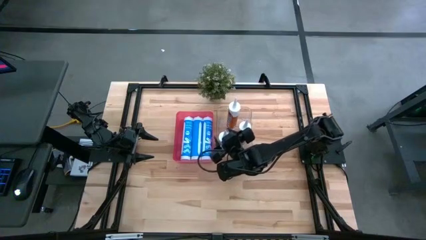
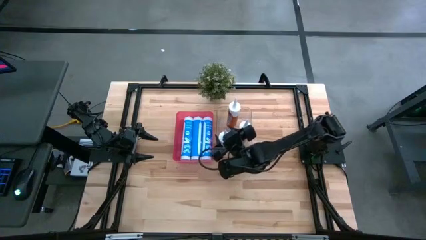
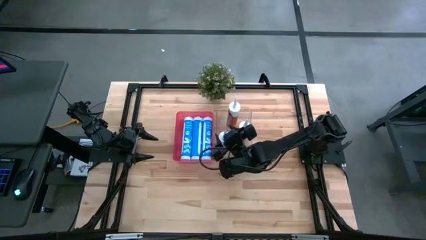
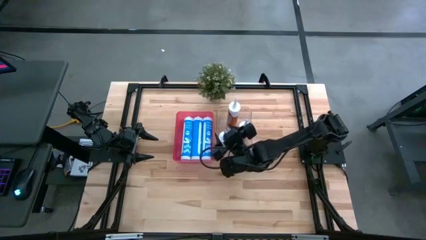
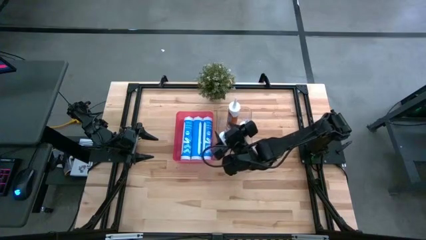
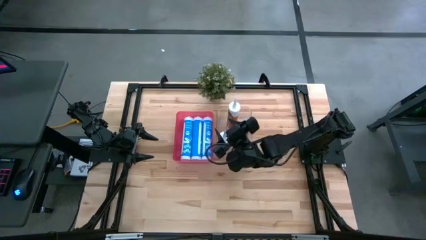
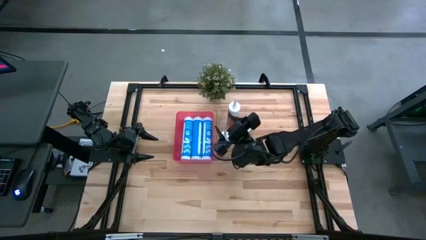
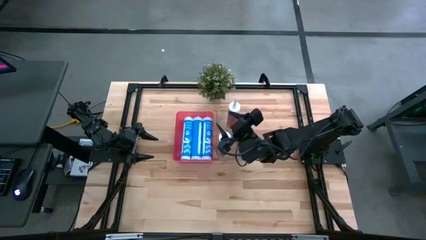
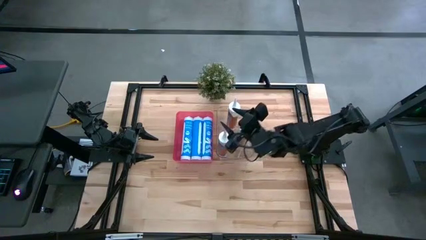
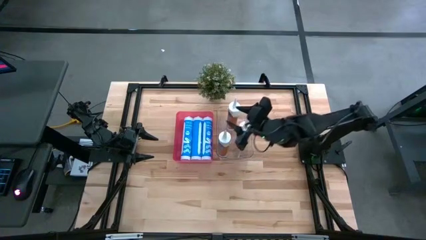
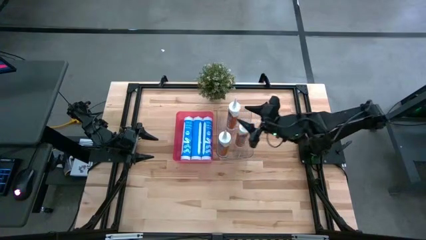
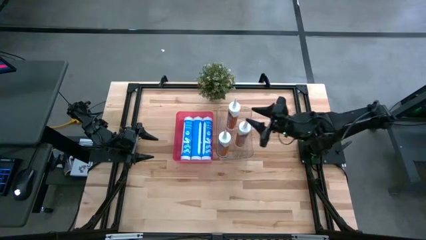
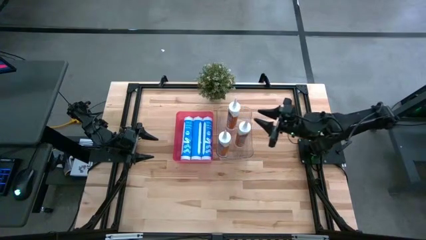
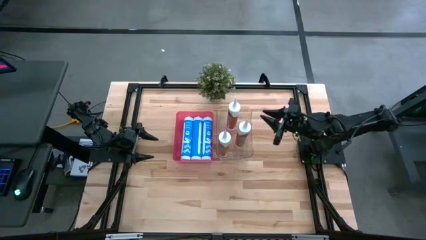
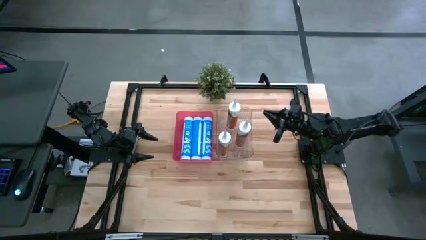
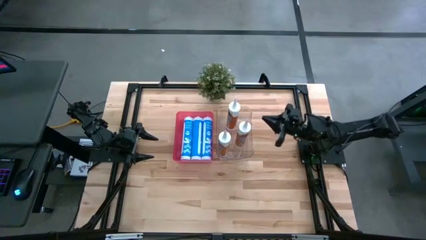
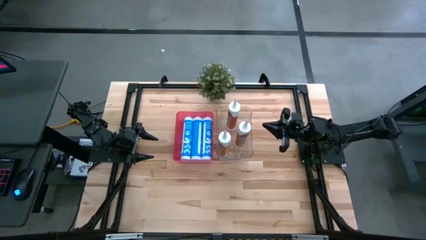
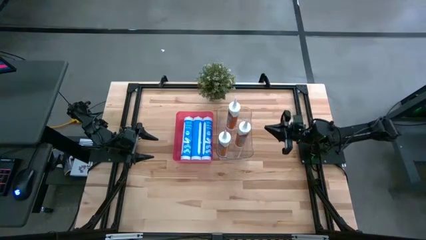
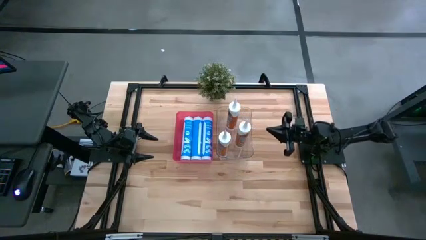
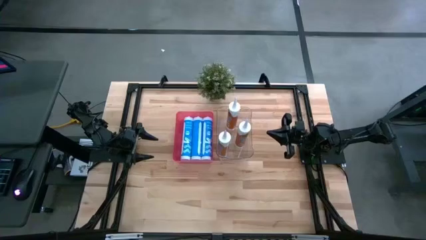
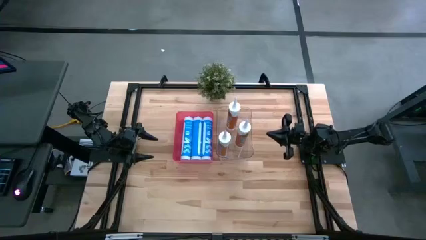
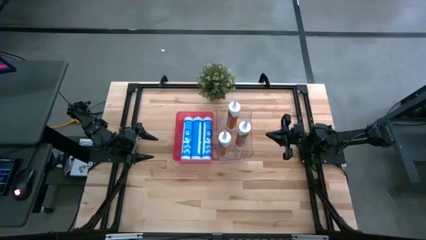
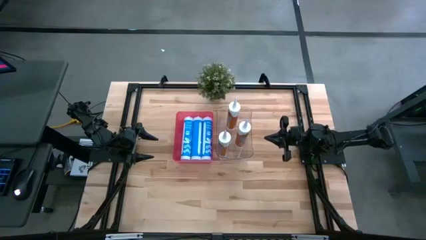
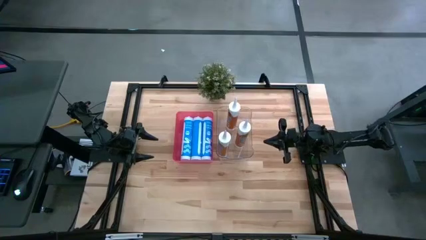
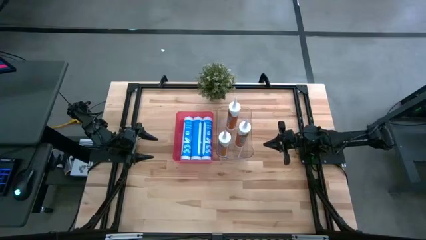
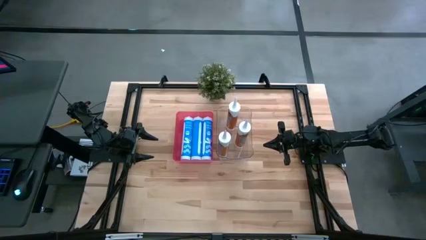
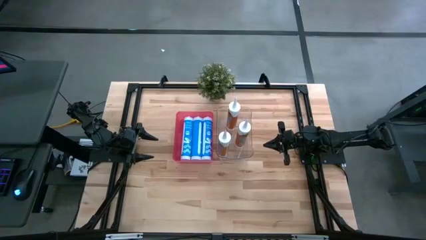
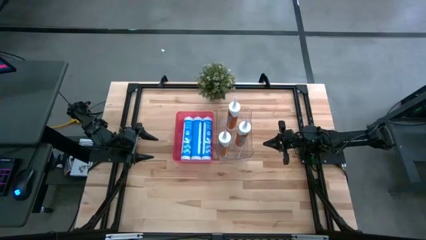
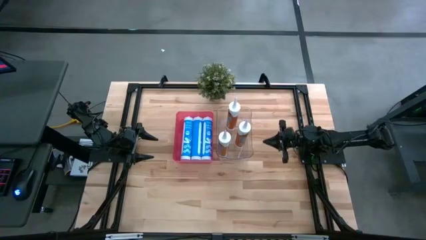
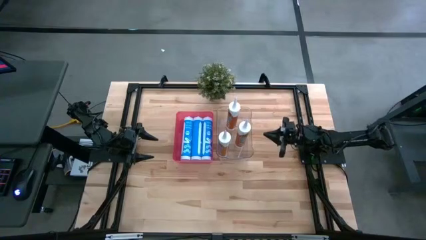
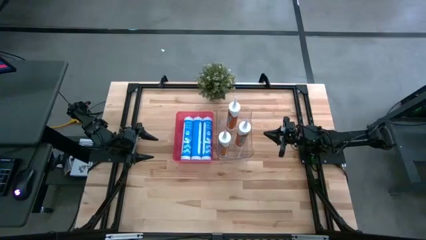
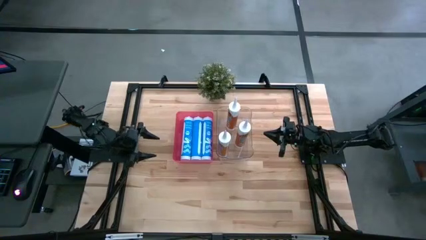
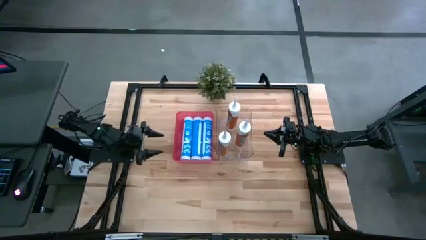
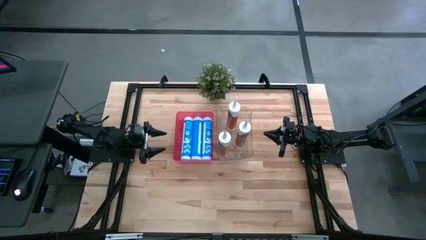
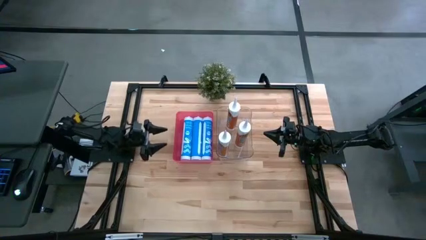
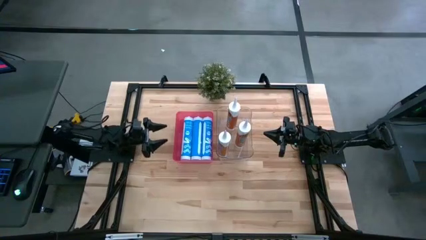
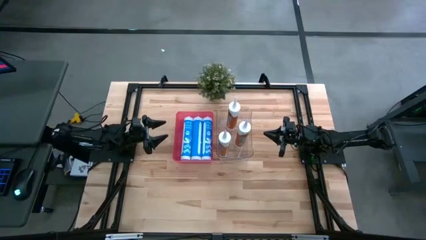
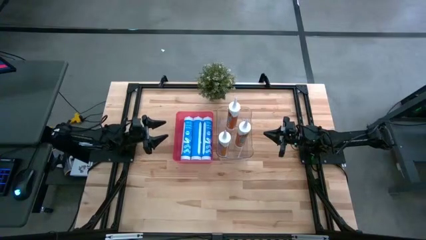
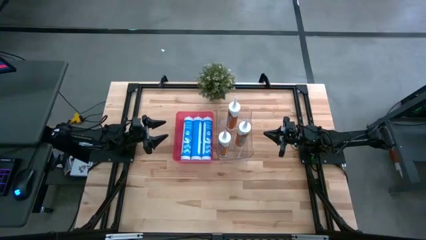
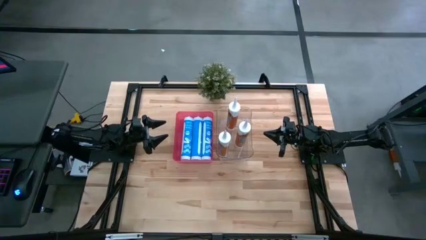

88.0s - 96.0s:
Task: Pick & place silicon tubes, Sealant and Lysol wipes
Return to Home Position

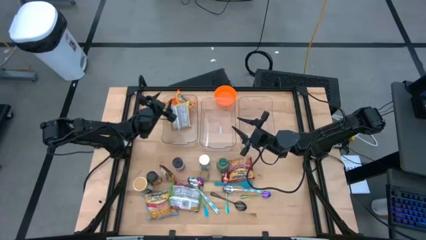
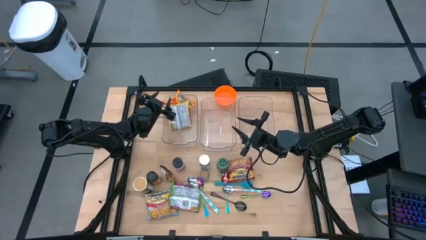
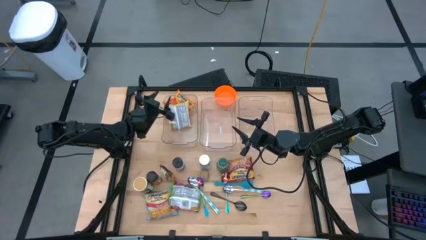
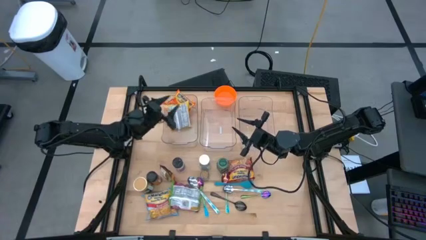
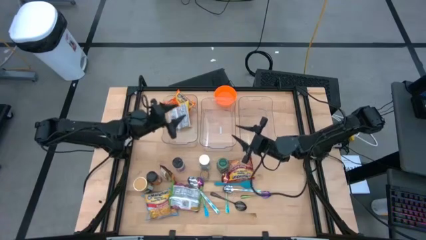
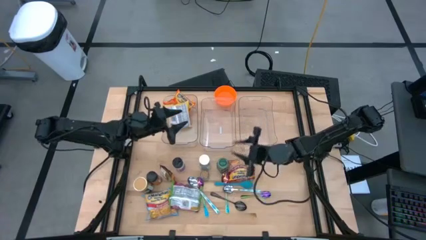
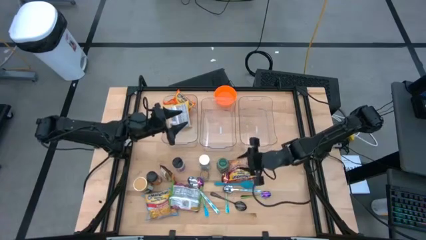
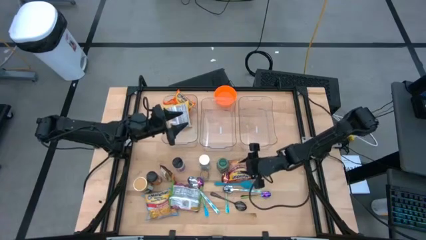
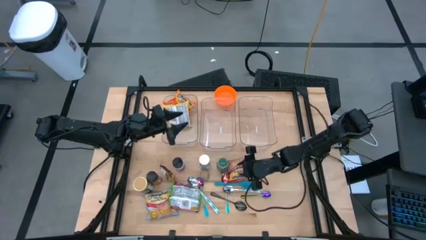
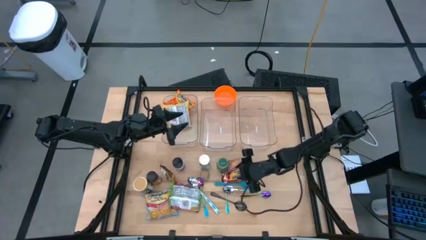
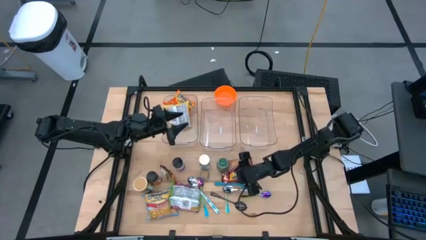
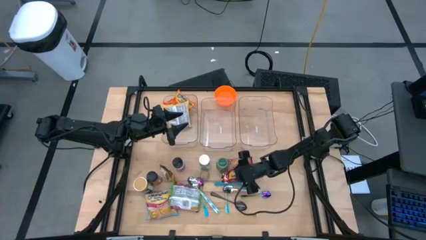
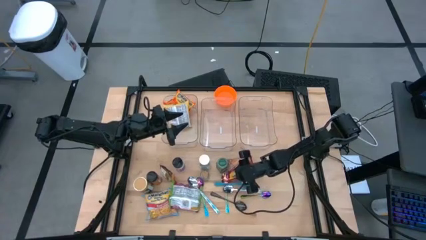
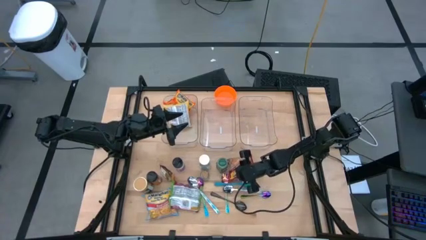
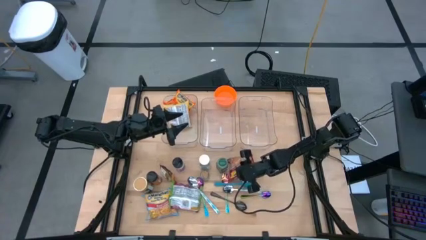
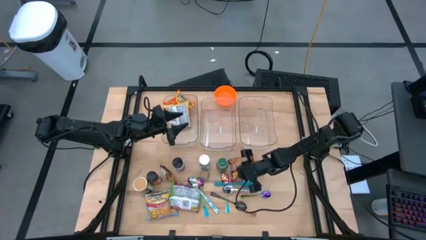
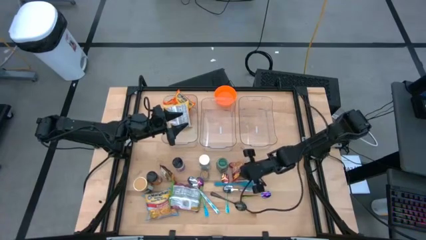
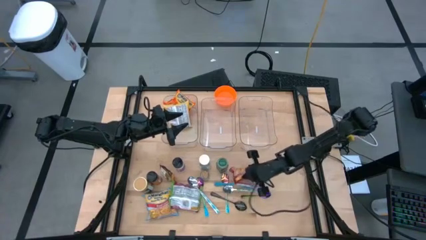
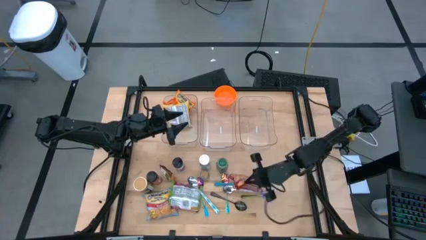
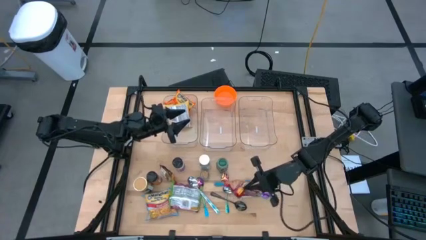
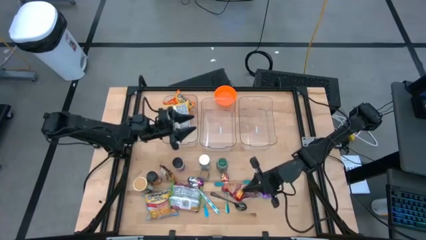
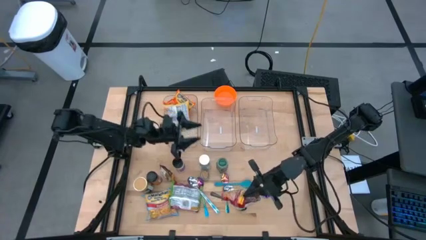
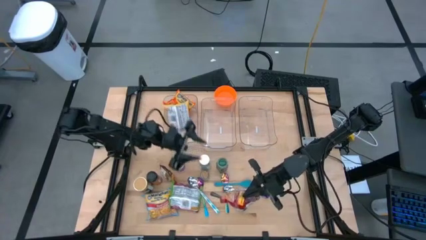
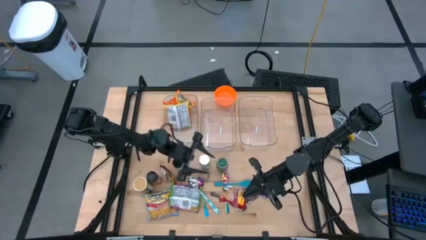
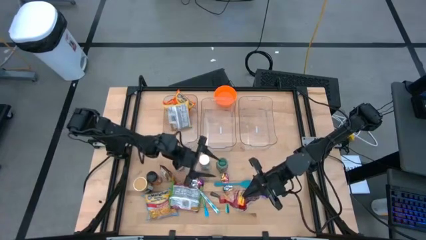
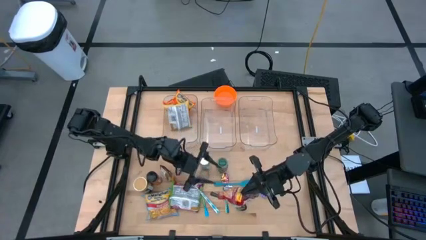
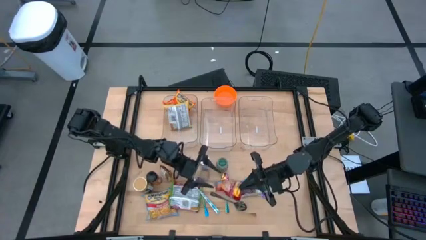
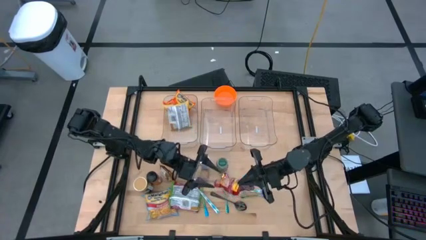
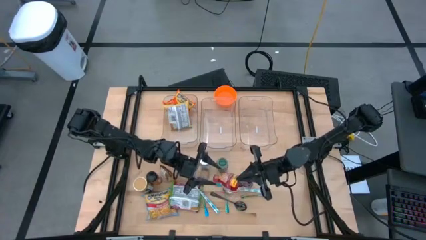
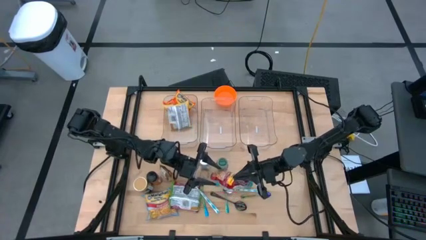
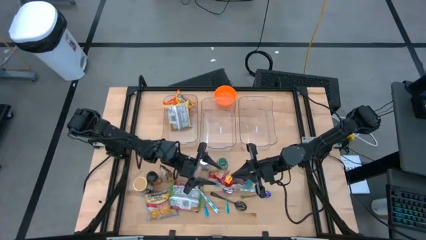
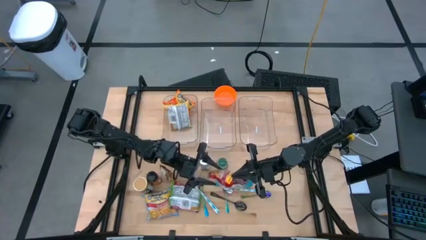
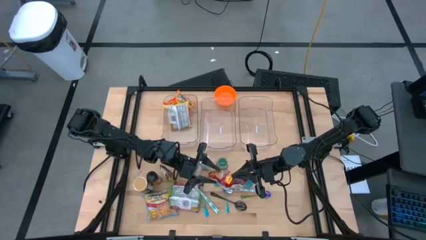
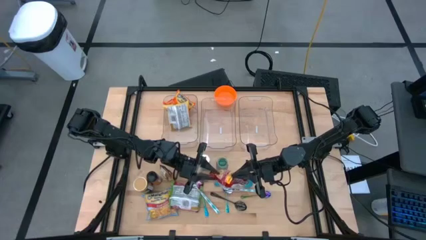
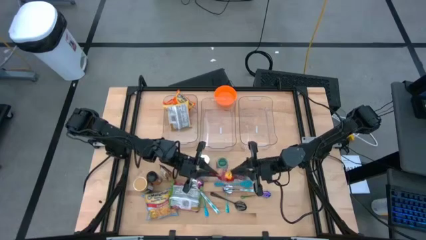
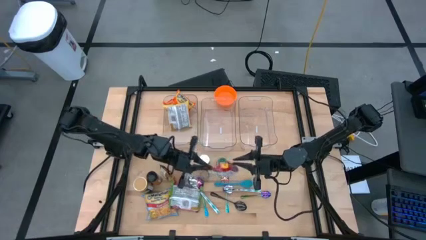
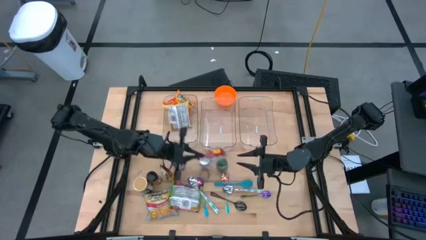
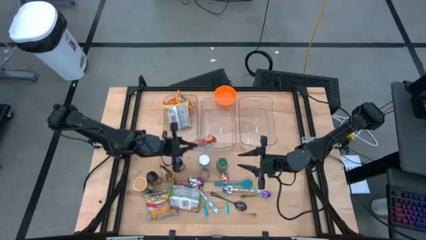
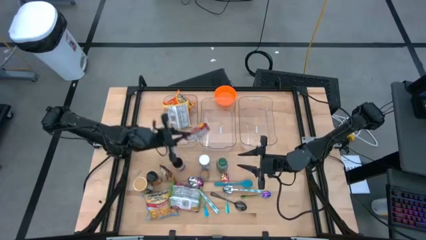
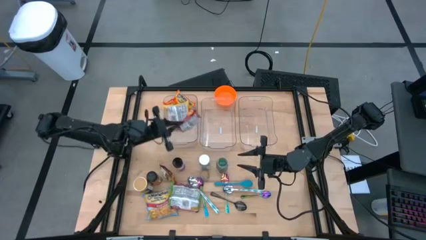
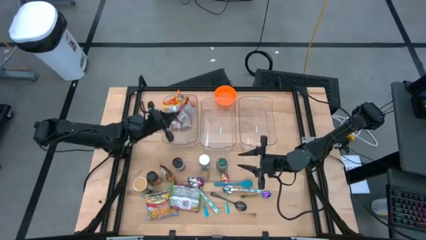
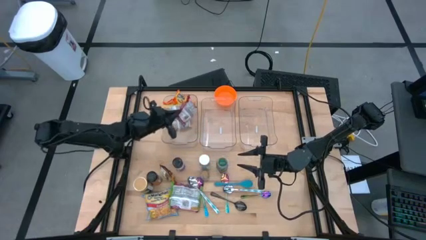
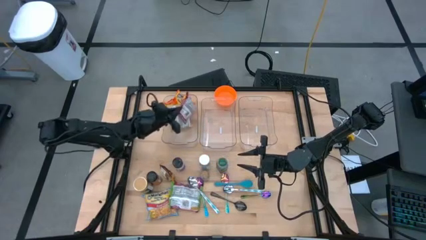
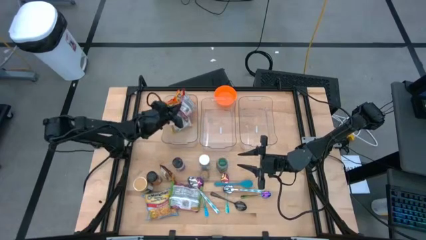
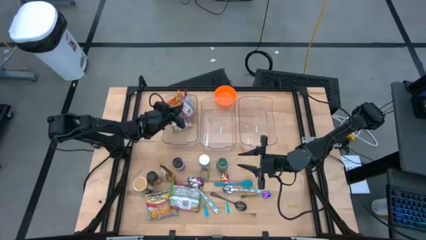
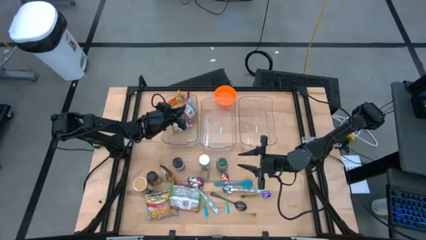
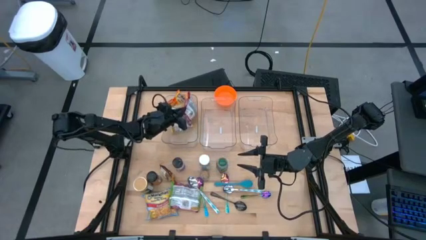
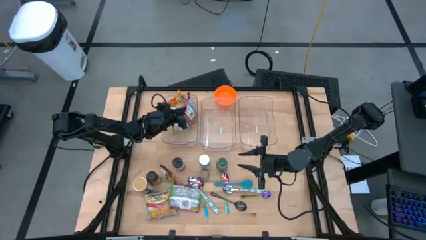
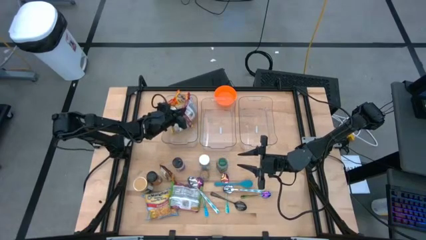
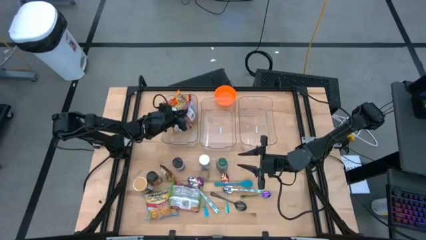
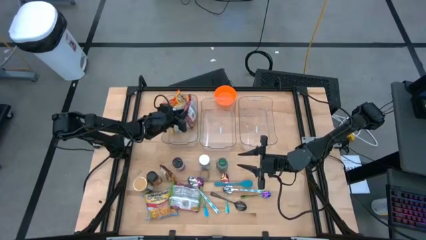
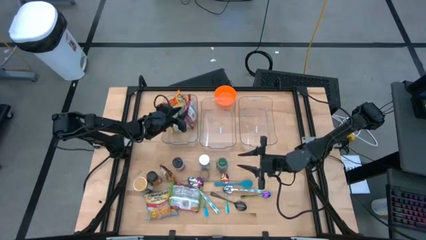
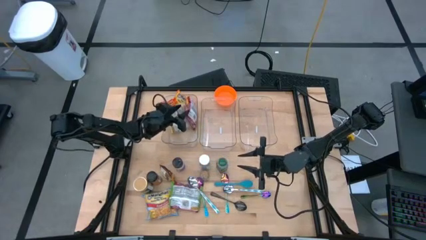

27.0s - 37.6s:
Task: Pick & Place Food Item
Put the red noodle pack into the left transparent bin
